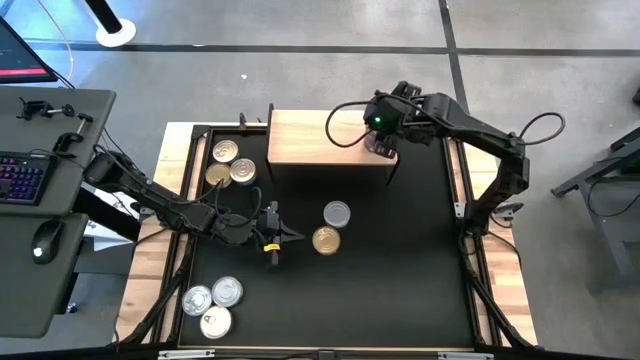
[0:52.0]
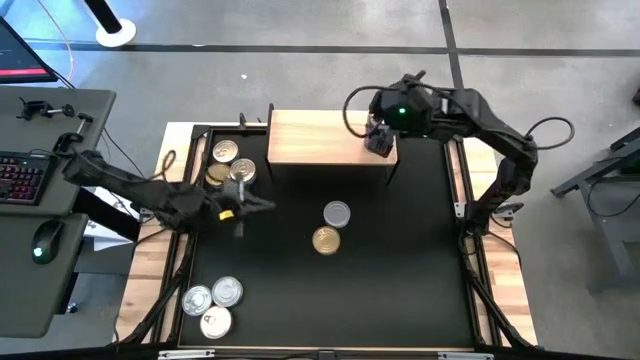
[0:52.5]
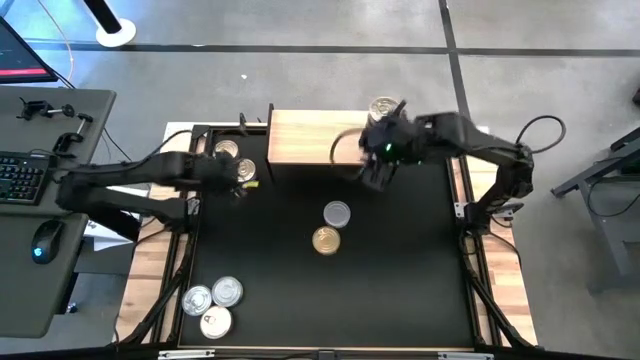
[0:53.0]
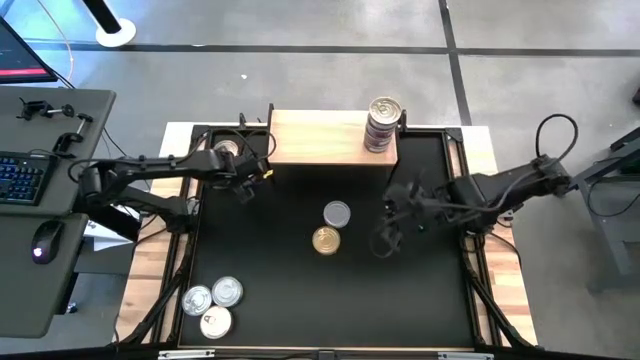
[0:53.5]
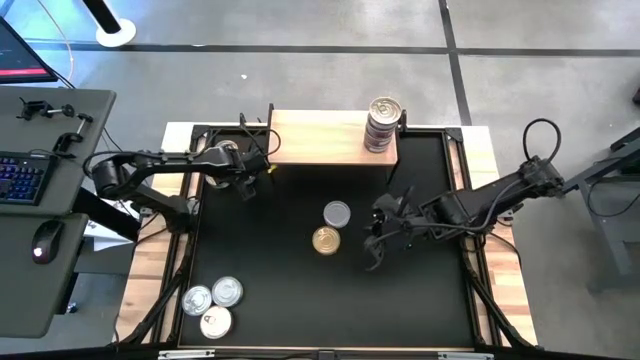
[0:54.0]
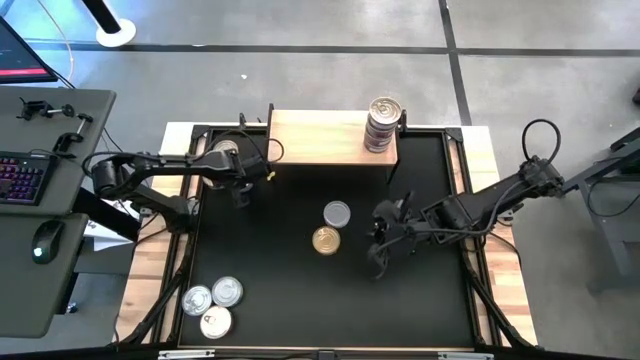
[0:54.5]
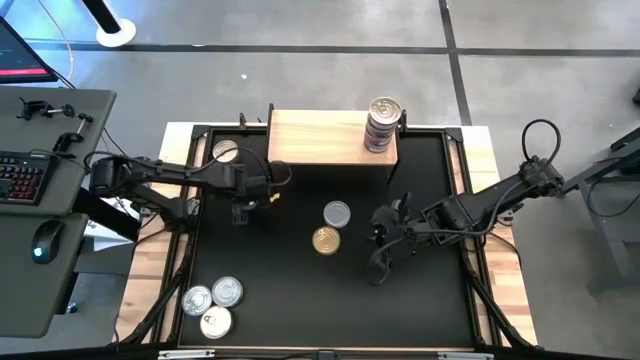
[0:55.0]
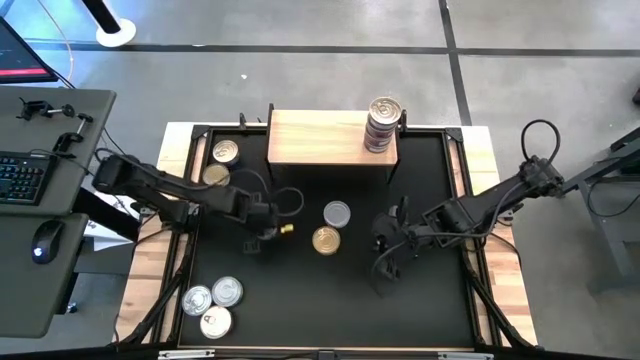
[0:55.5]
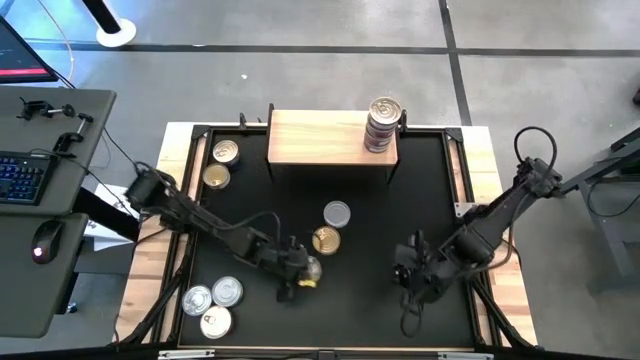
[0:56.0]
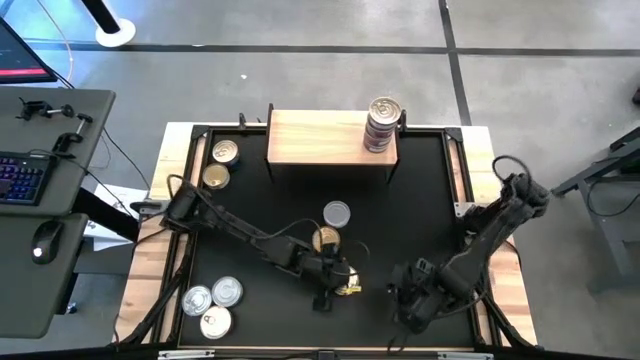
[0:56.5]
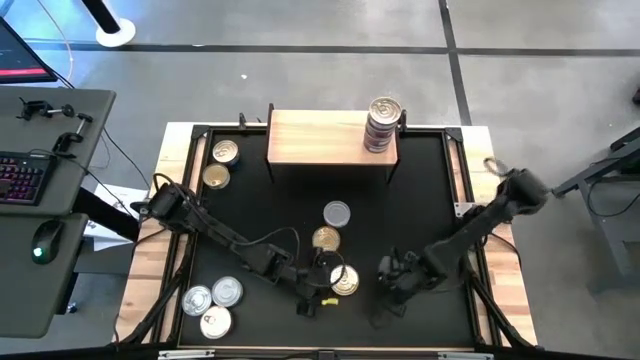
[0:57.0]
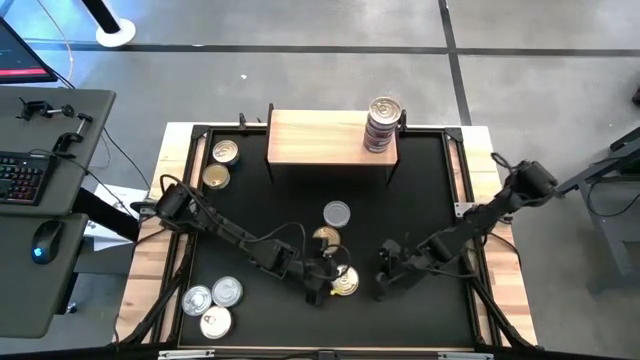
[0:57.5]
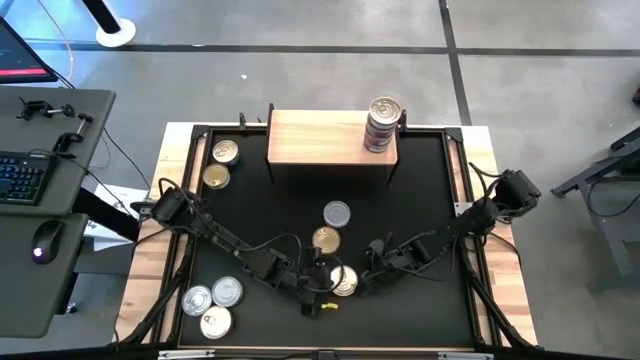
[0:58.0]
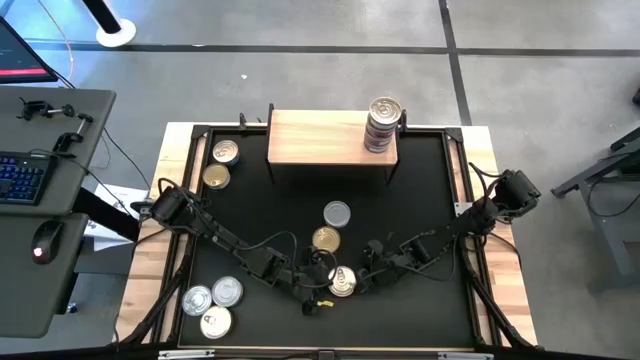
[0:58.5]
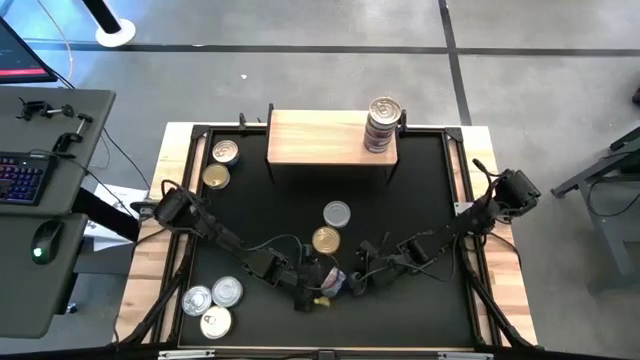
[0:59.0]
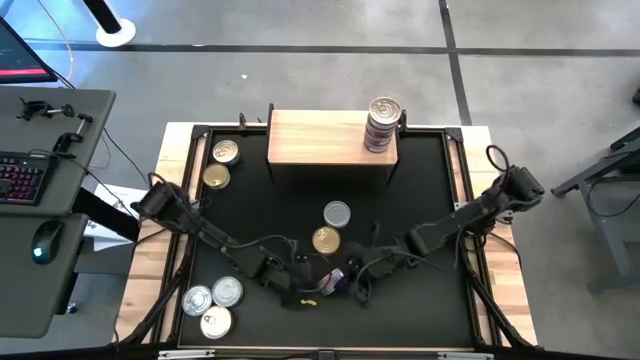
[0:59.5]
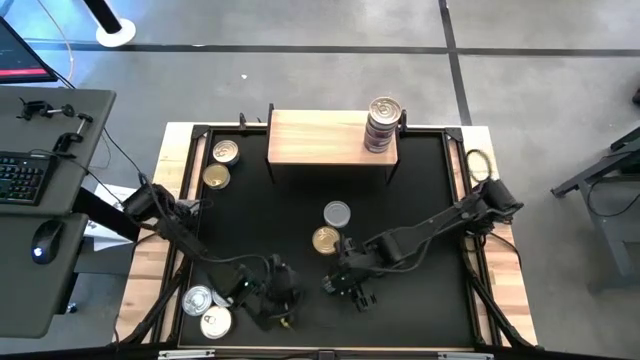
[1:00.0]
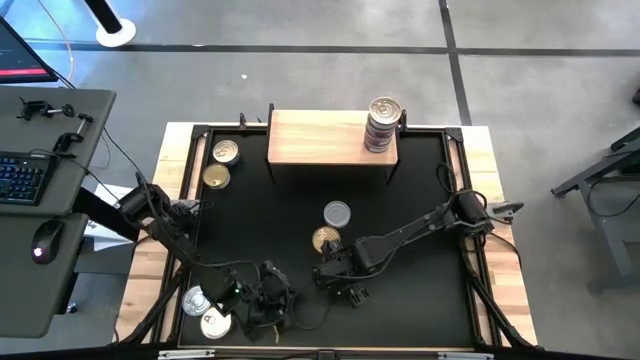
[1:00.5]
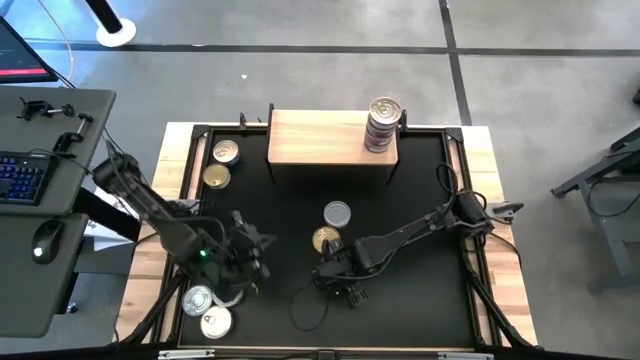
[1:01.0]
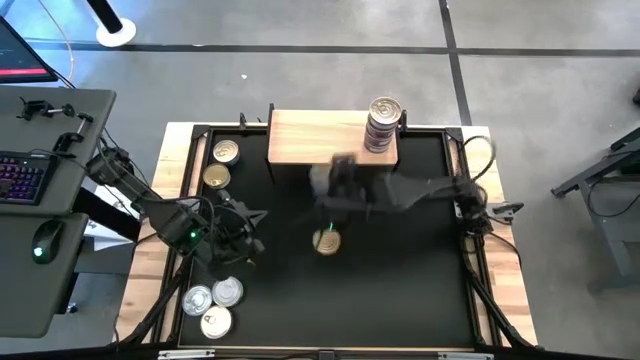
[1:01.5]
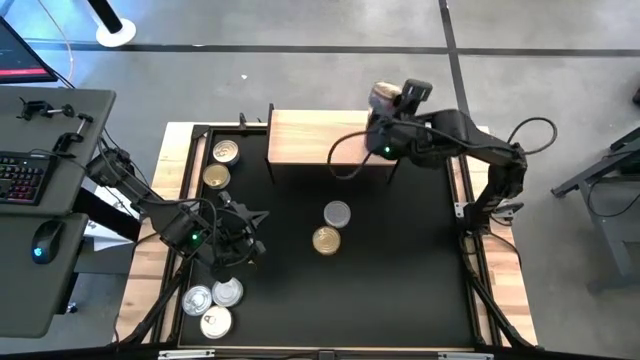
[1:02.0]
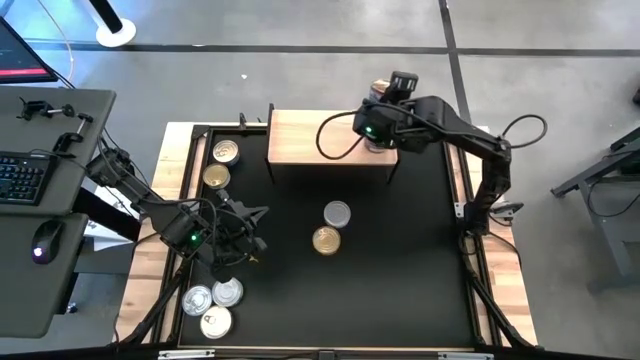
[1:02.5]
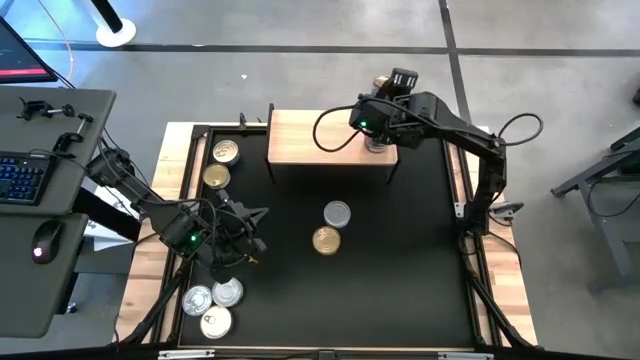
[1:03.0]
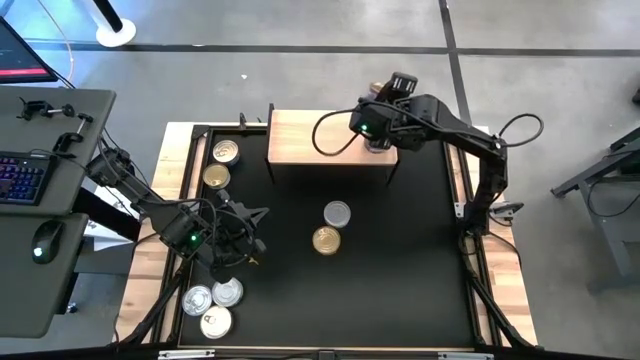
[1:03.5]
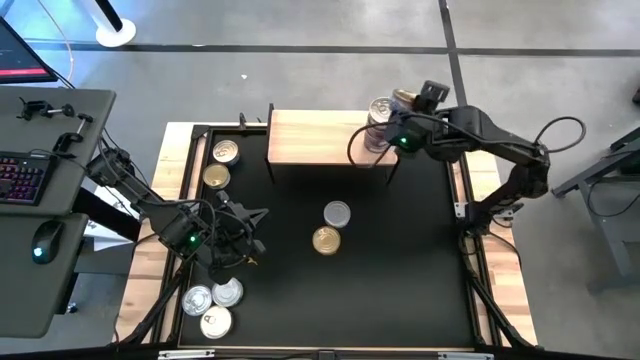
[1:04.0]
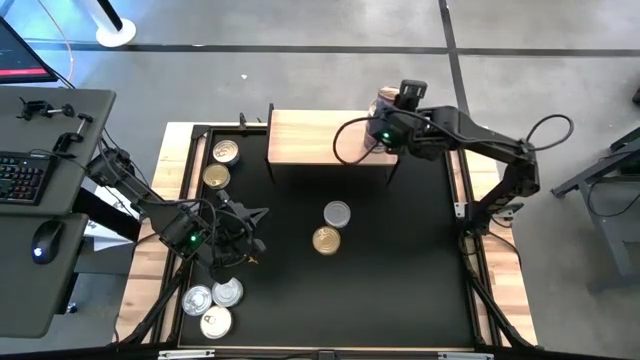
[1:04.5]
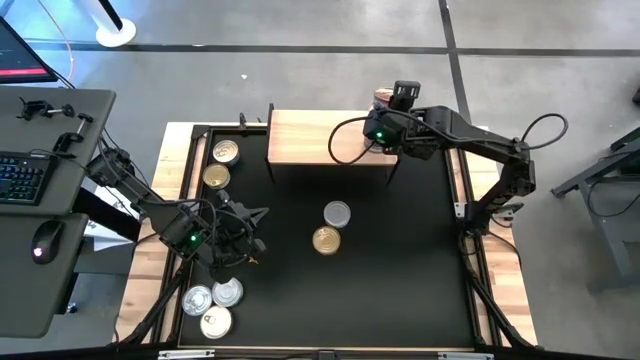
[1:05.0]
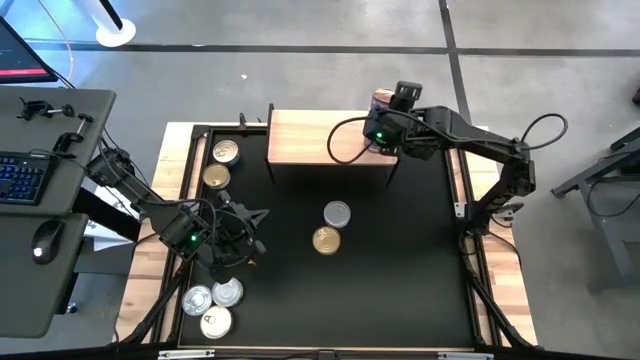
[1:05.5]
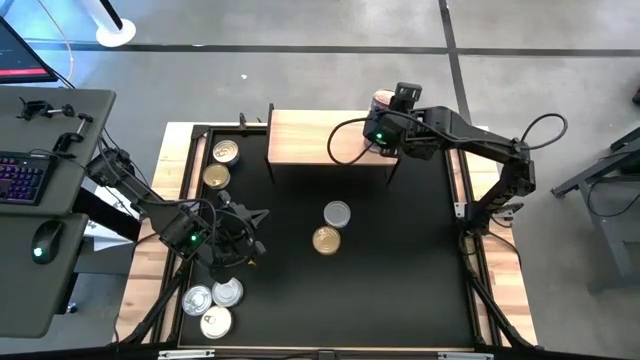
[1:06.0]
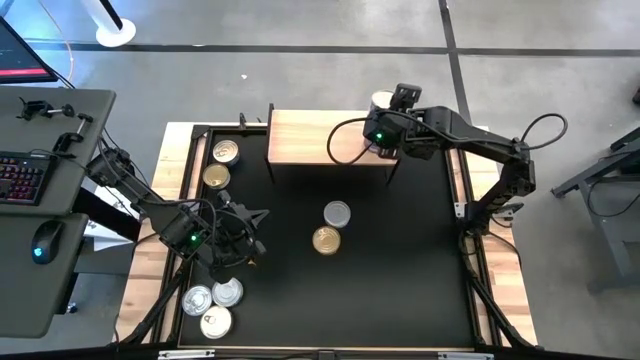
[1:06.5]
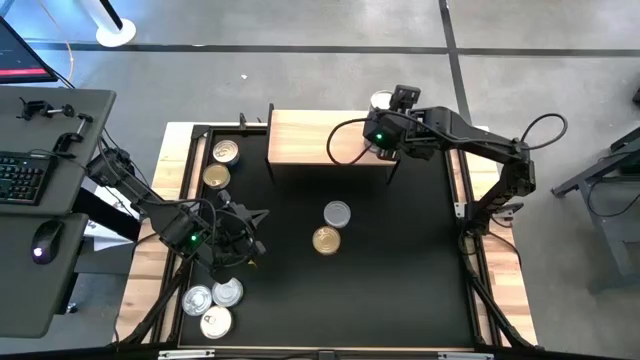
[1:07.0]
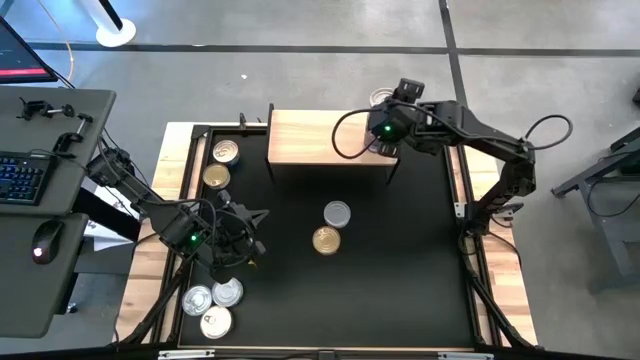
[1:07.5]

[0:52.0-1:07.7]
Task: Stack canned seafood by type on shelf
Stack the blue tuna can on top of the blue tuna can

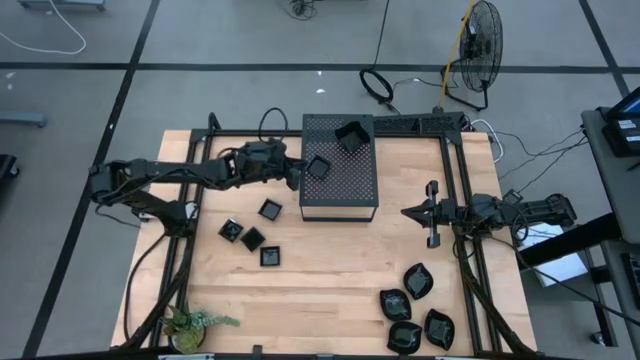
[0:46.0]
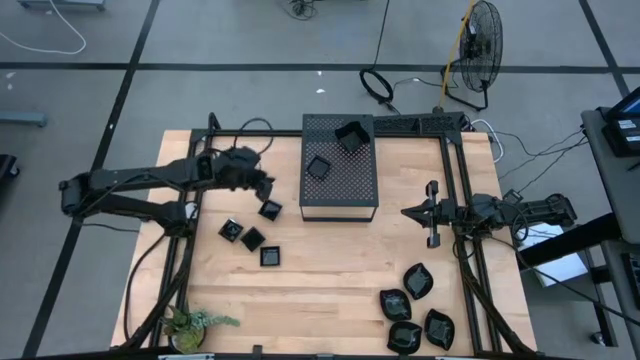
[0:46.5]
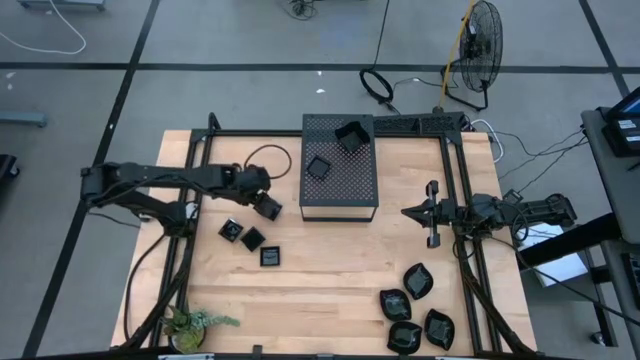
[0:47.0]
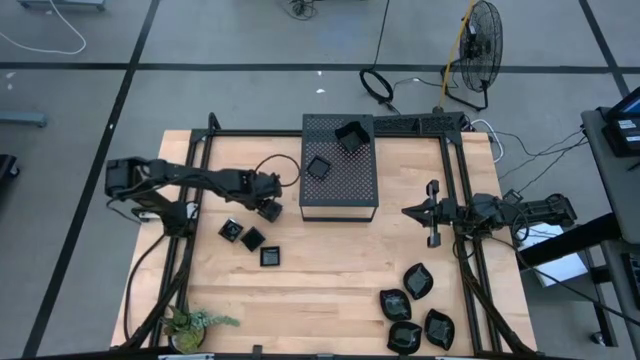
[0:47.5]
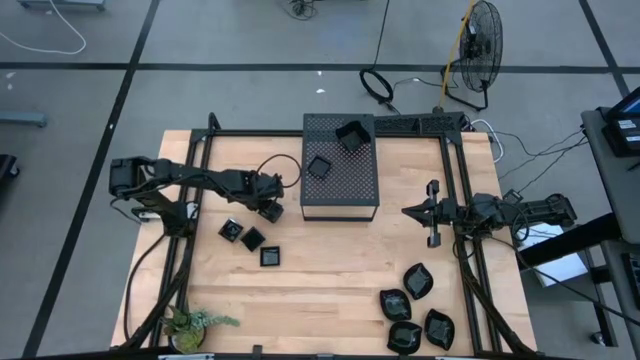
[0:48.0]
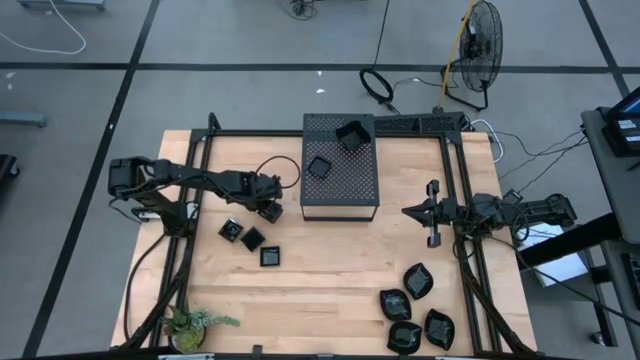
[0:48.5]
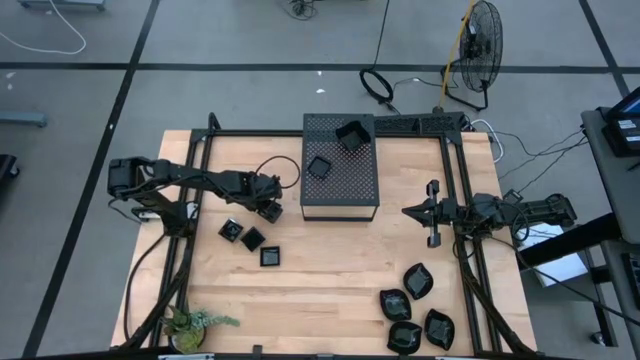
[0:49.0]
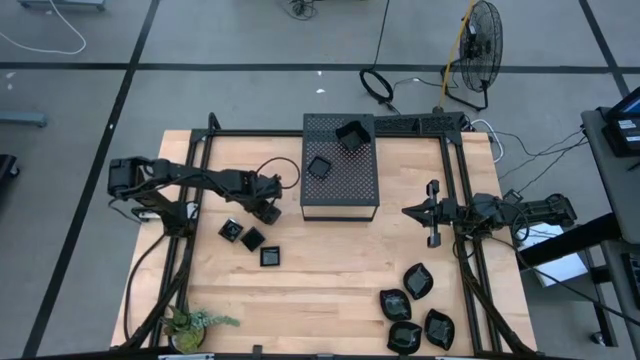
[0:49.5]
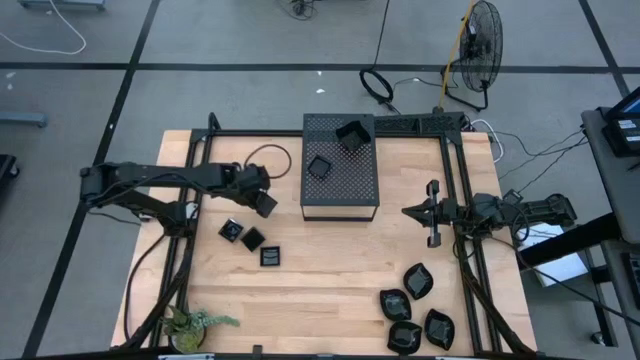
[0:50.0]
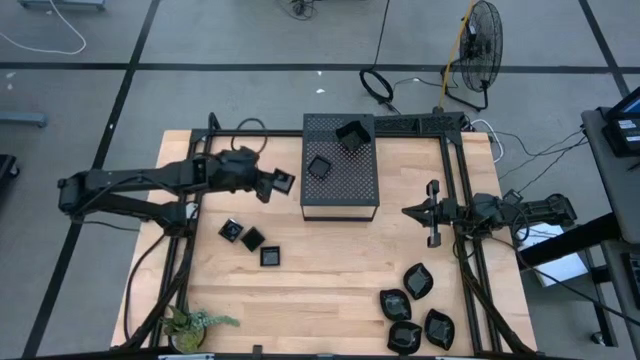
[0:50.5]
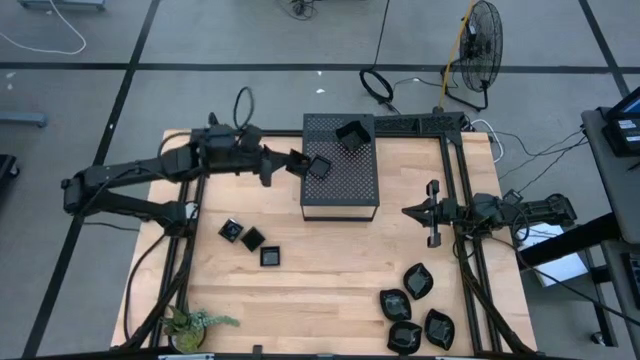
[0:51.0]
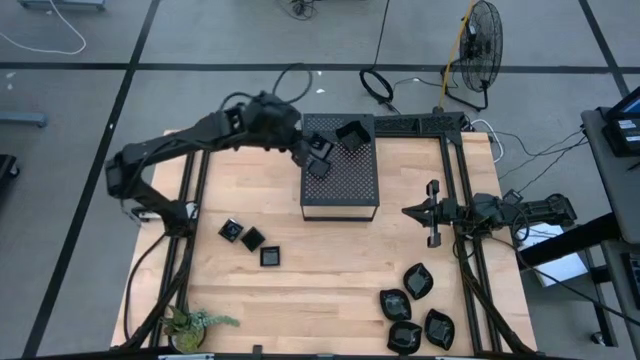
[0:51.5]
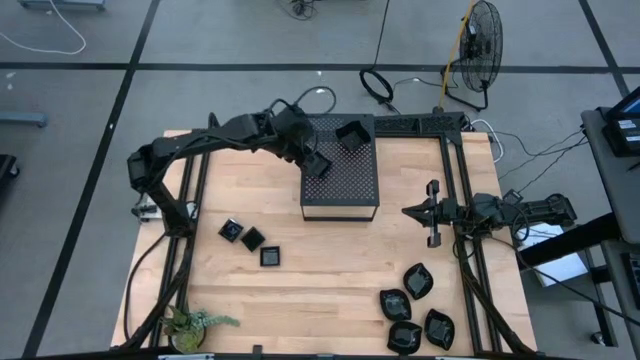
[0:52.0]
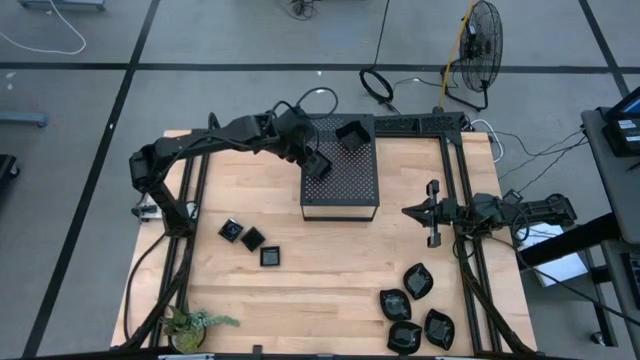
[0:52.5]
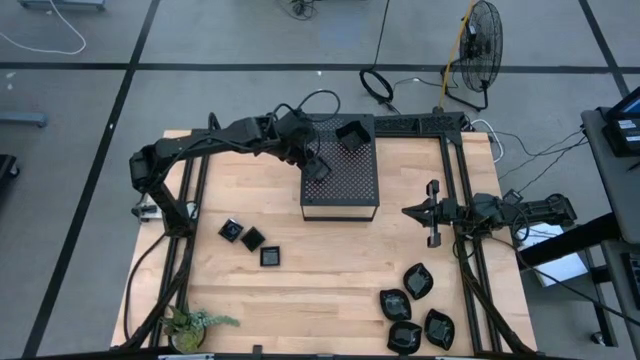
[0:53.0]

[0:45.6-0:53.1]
Task: Pick & Place Mini shaped plates
Stack the square plate on top of the square plate on the shelf
